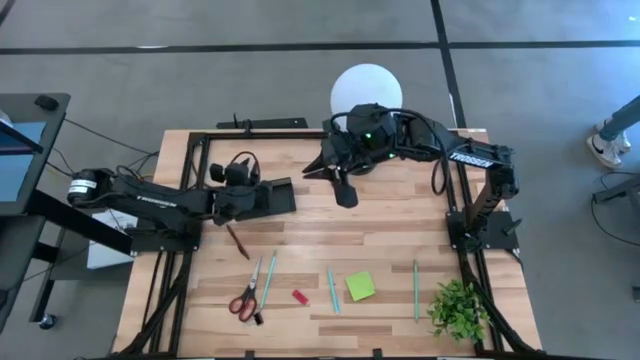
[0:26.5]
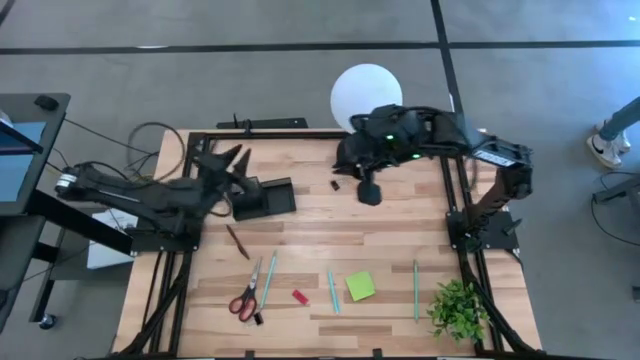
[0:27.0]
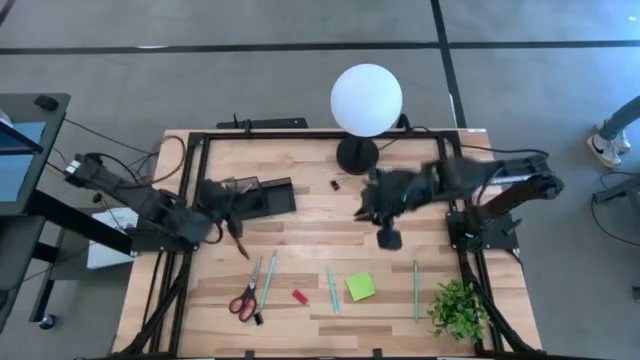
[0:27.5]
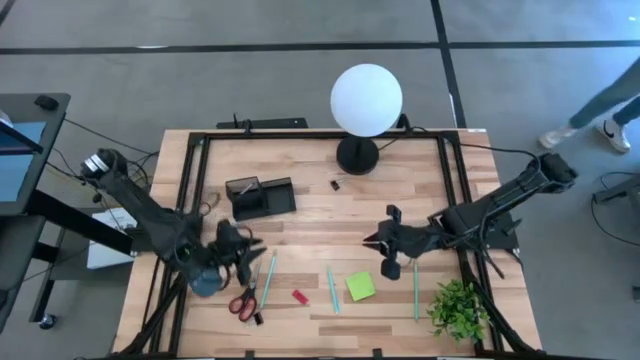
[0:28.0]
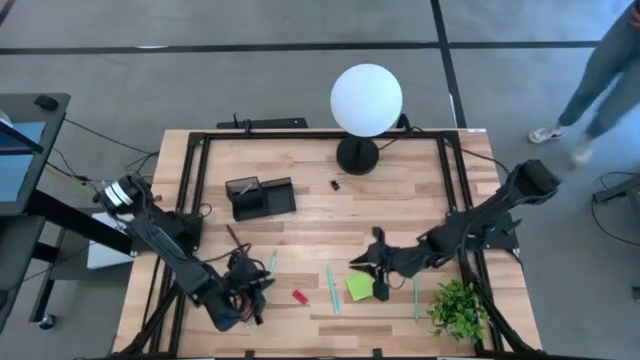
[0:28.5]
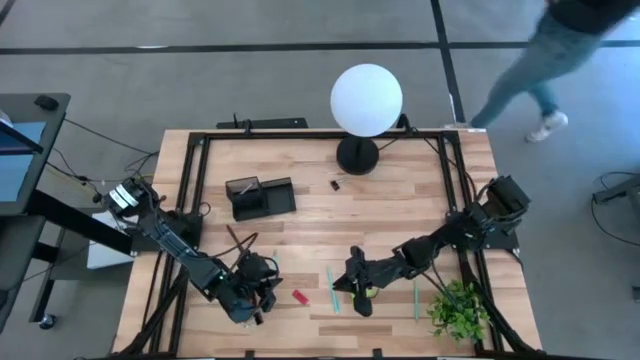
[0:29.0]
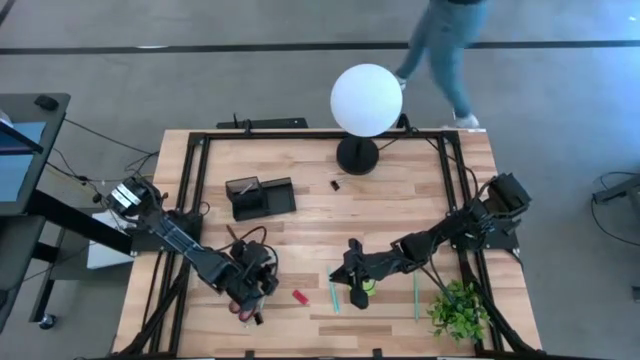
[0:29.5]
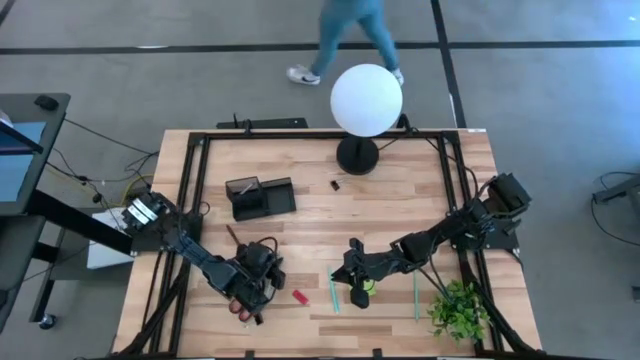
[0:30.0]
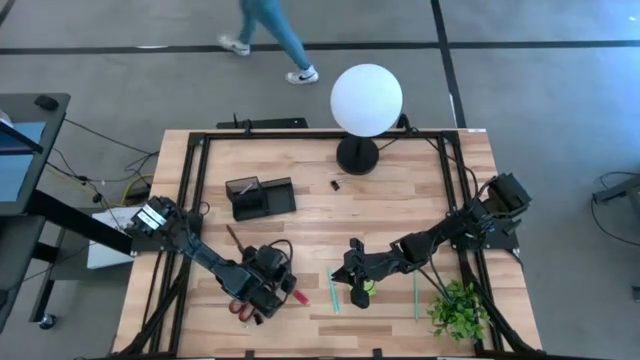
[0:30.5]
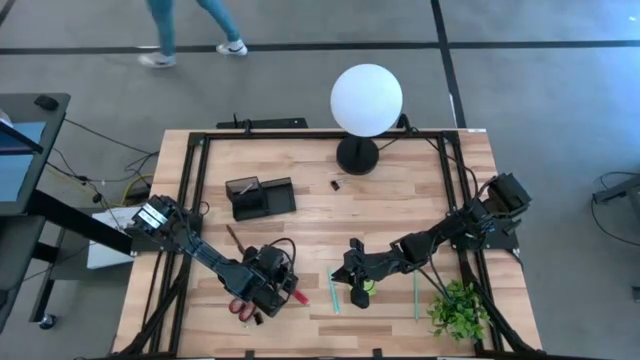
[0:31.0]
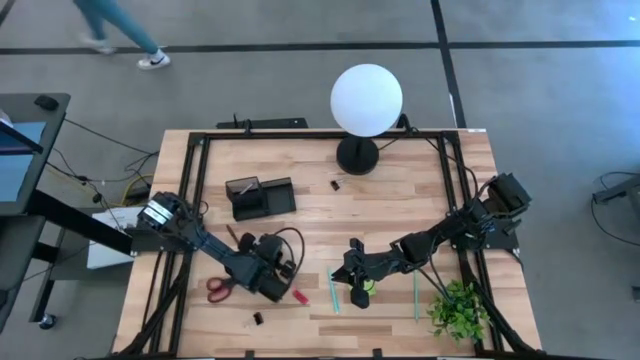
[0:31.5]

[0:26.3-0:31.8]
Task: Pick and place office supplies into organizer
Put the left blue pencil into the black desk organizer

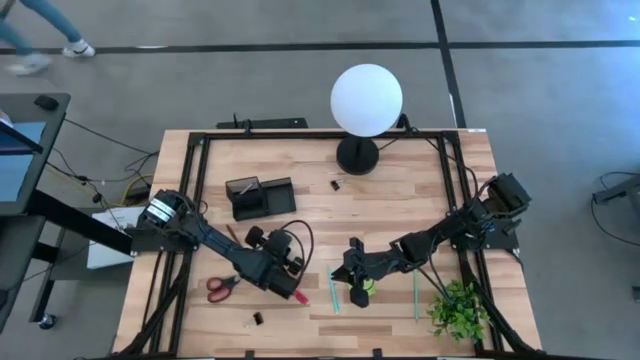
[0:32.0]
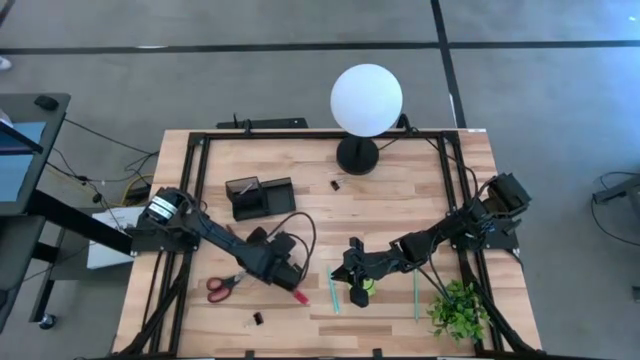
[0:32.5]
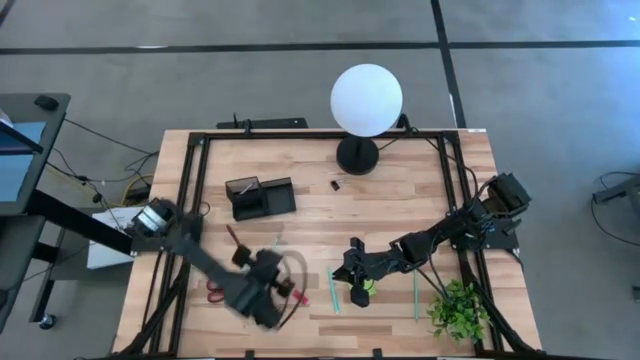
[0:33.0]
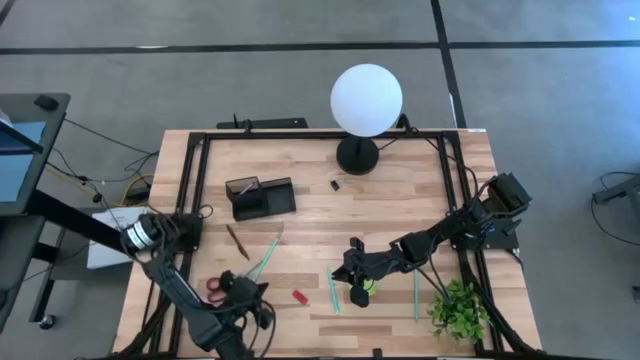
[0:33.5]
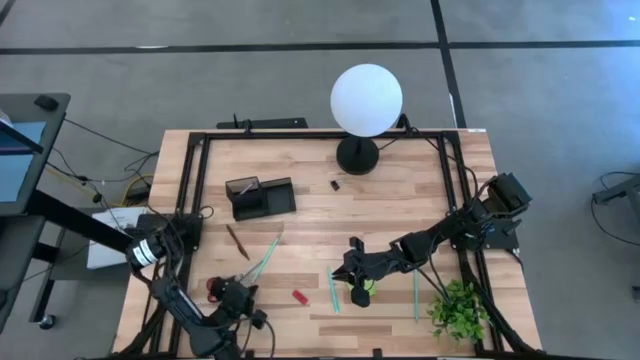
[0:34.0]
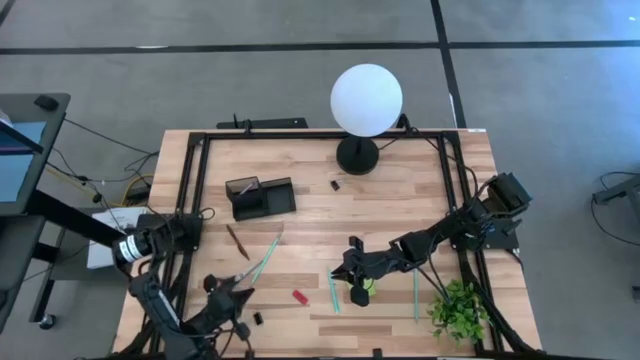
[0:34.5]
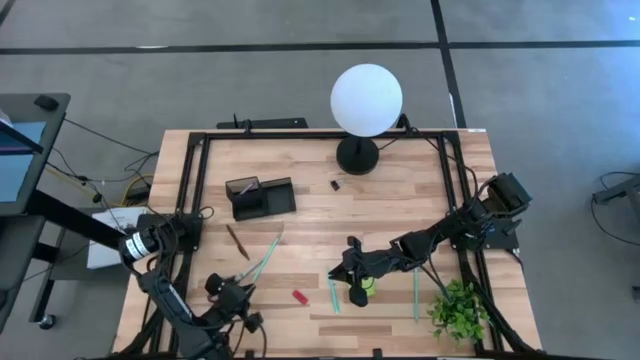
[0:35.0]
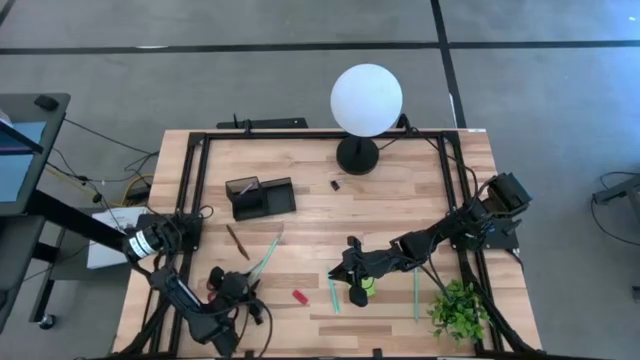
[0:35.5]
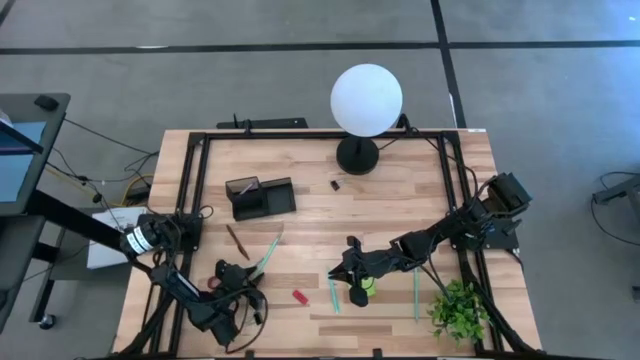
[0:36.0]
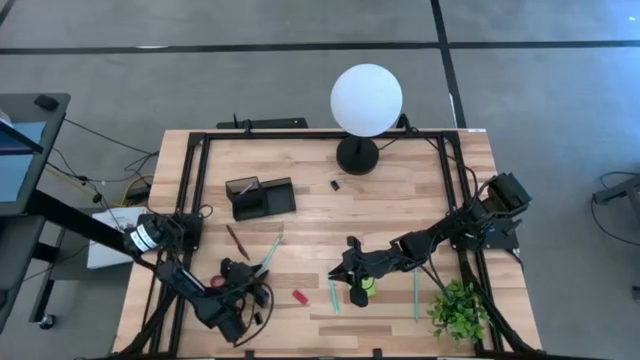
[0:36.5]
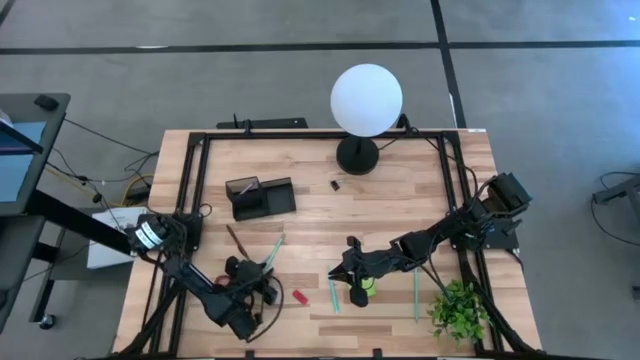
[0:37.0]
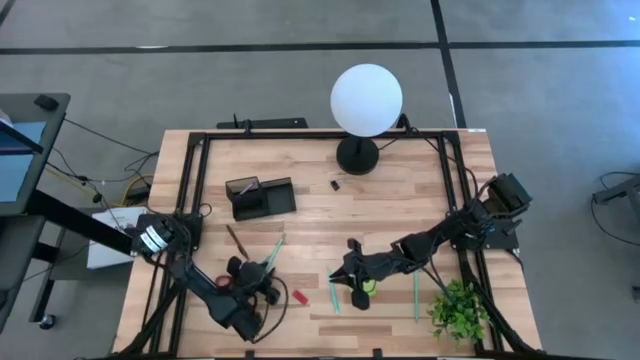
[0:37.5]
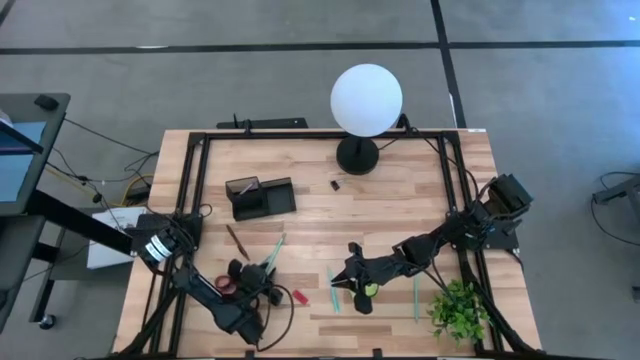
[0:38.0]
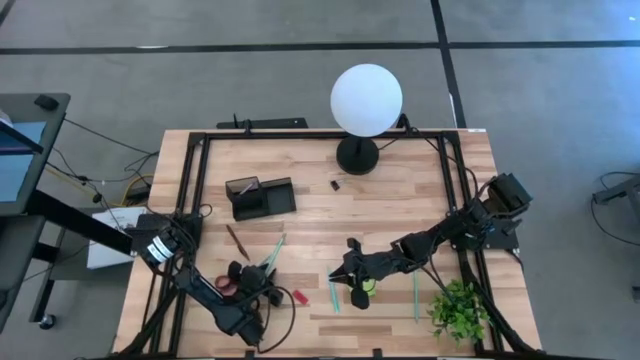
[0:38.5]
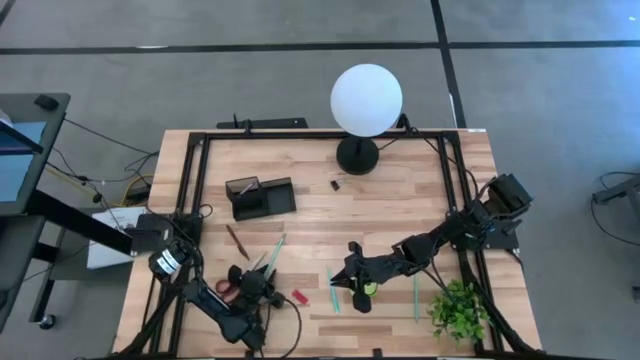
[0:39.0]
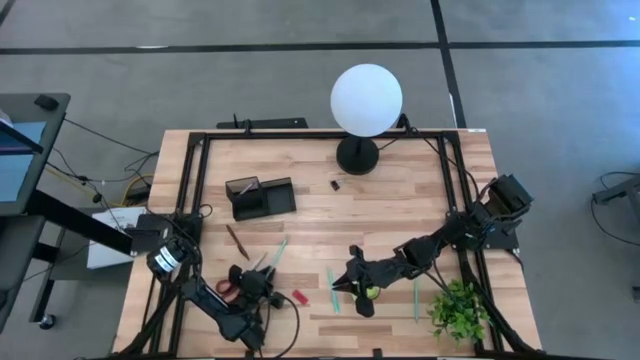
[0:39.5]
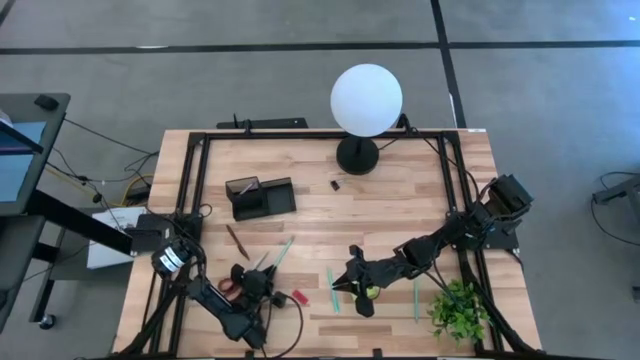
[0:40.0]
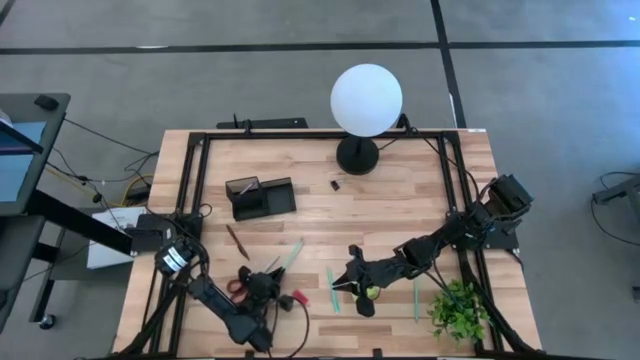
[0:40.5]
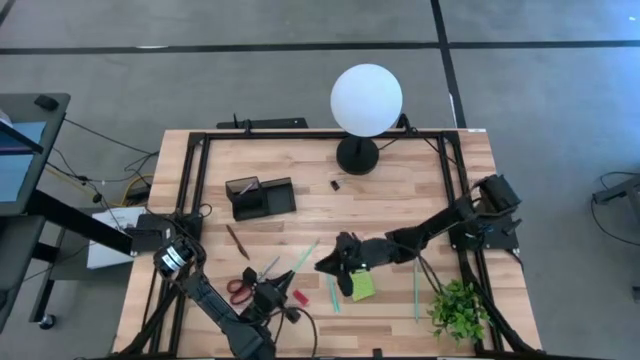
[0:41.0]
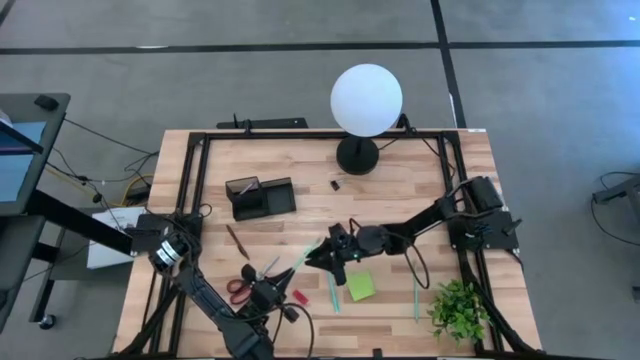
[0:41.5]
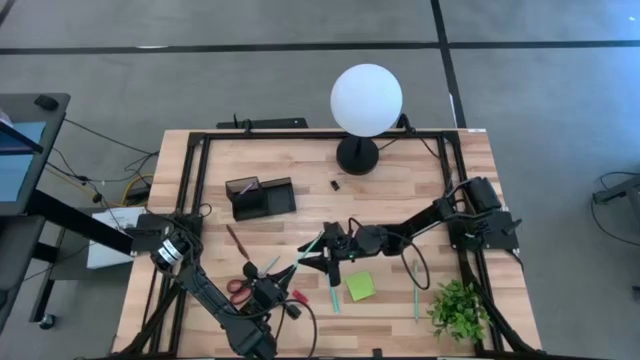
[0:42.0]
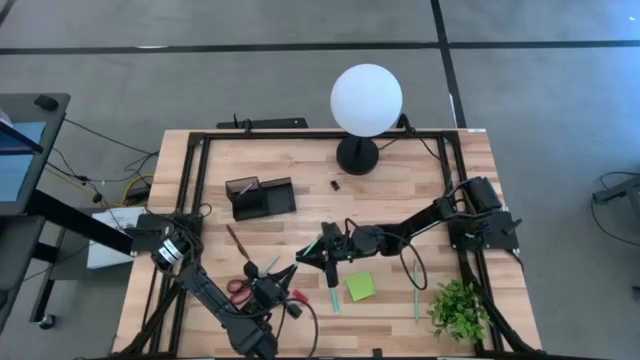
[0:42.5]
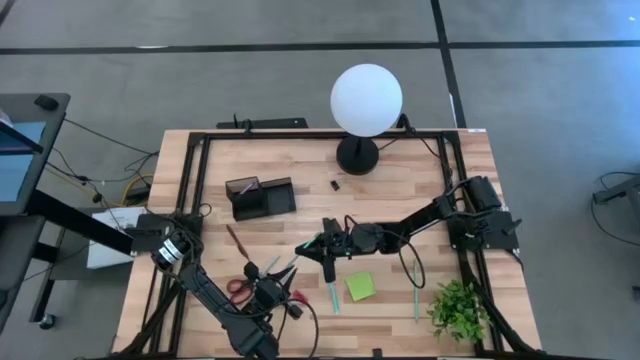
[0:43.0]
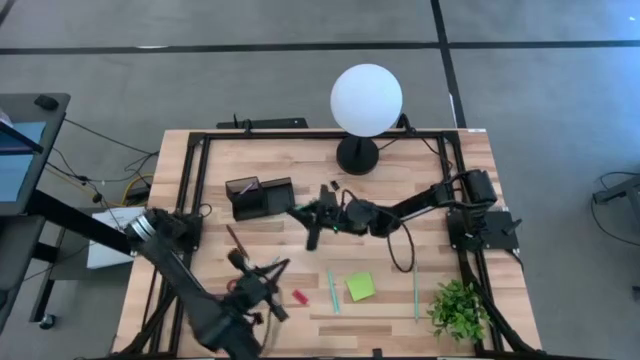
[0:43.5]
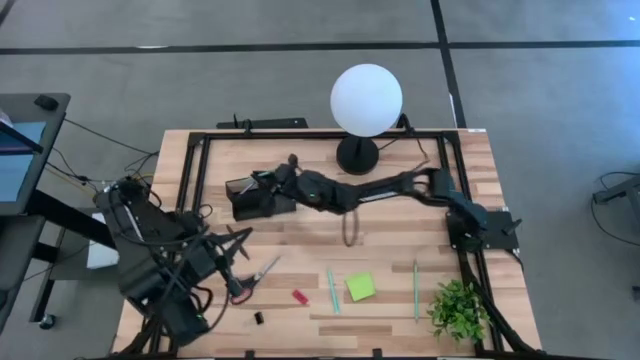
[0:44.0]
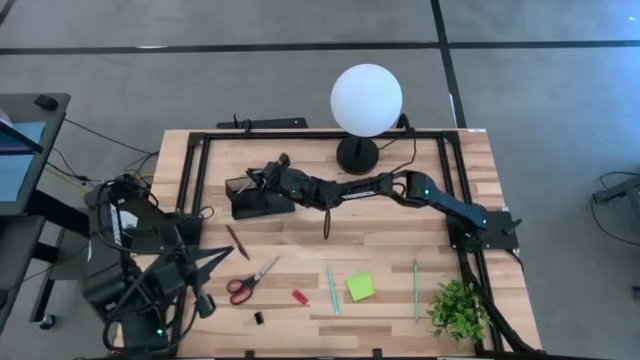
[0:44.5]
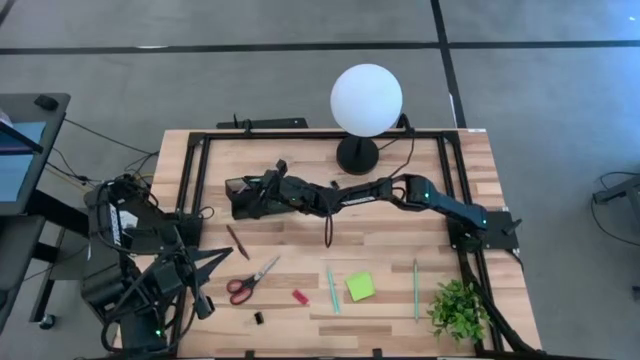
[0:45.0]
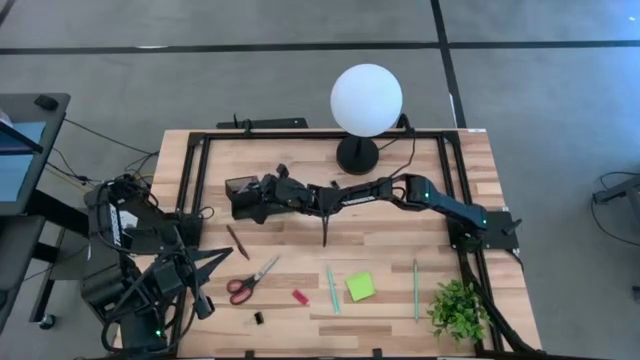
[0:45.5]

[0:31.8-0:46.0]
Put the left blue pencil into the black desk organizer

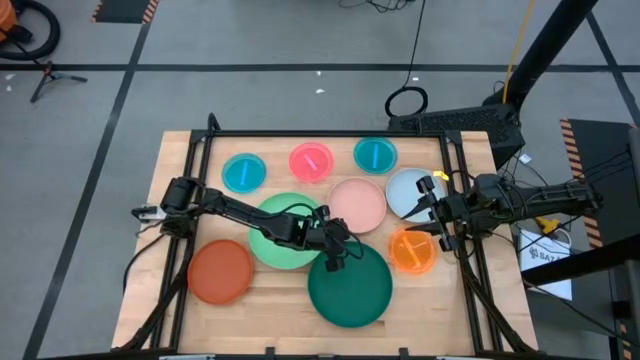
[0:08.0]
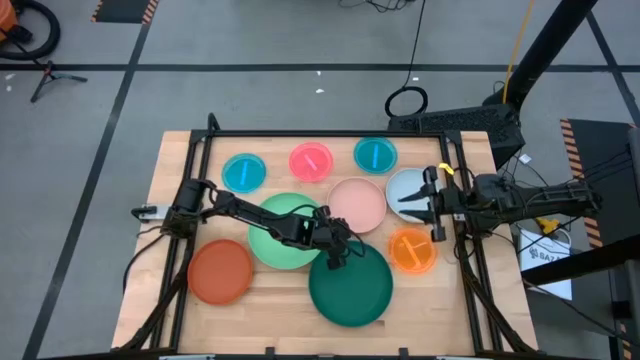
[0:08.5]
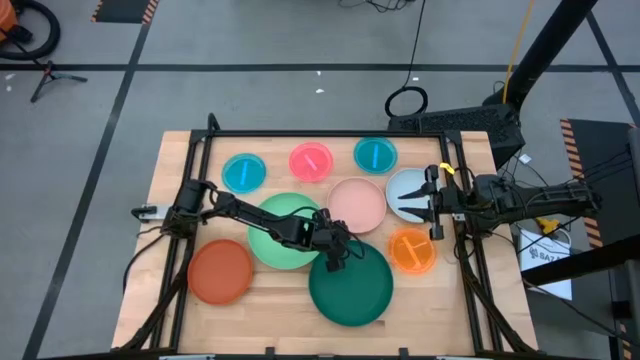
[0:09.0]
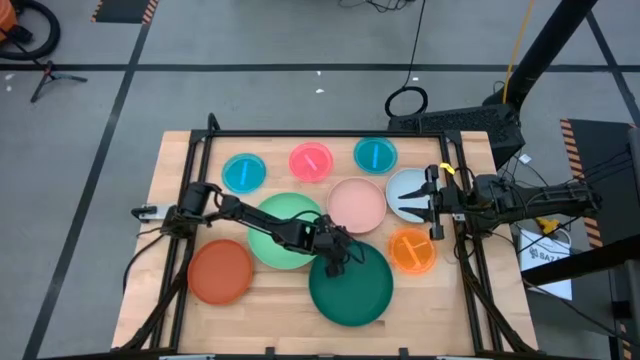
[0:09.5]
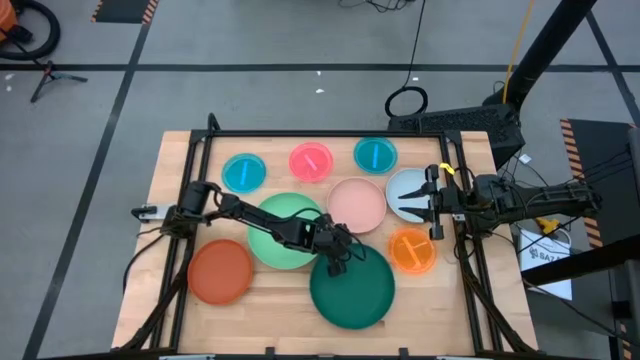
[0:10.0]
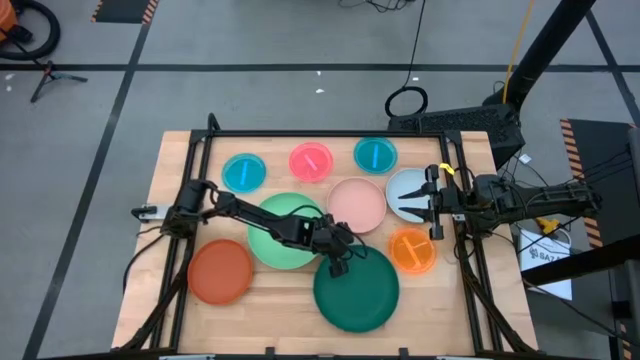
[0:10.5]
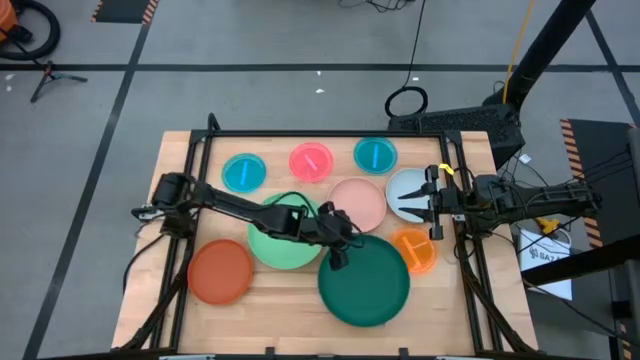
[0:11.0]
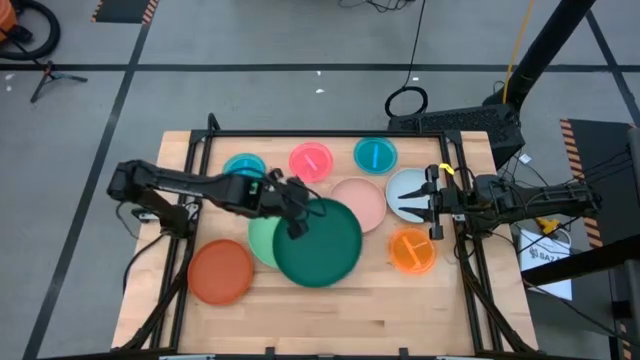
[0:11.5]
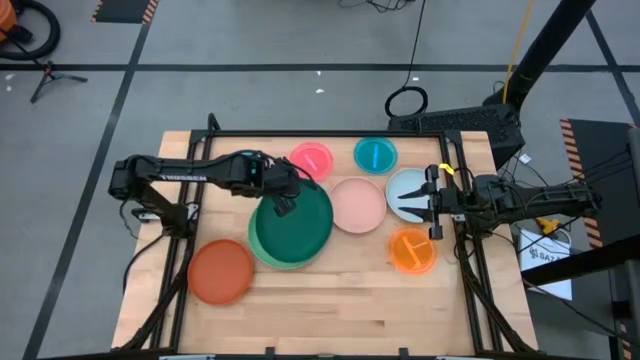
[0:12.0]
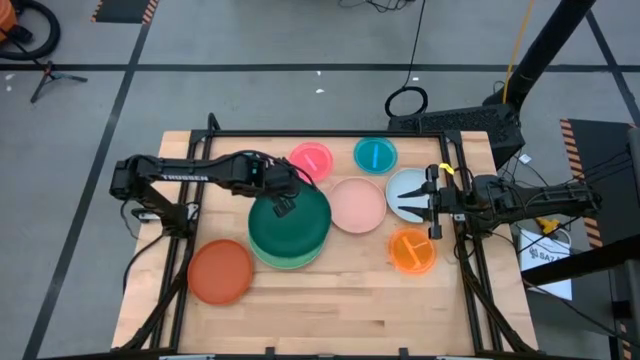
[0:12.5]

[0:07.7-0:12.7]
Task: Stack plastic plates
Stack the green plate on top of the light green plate
